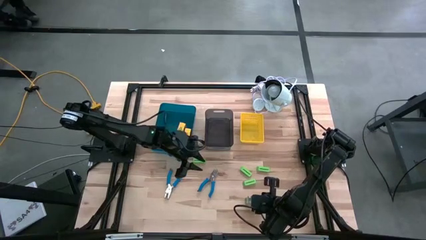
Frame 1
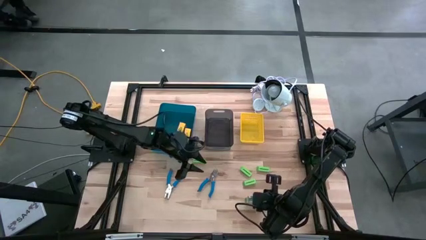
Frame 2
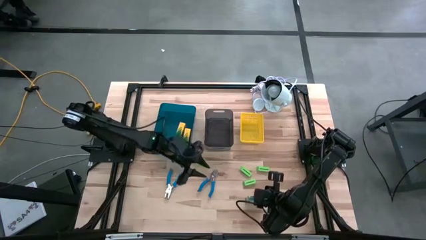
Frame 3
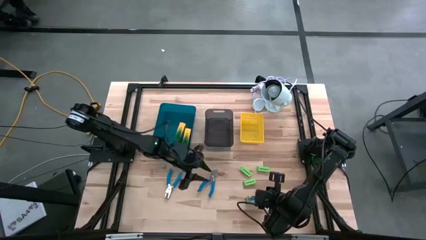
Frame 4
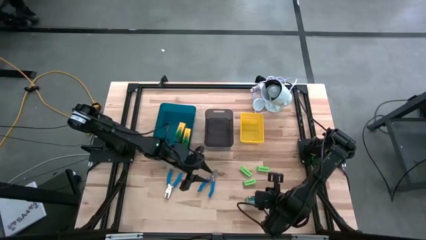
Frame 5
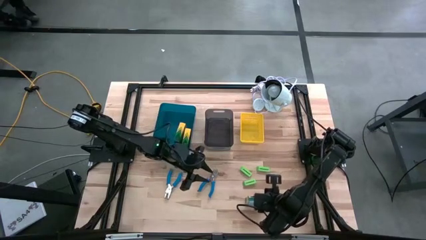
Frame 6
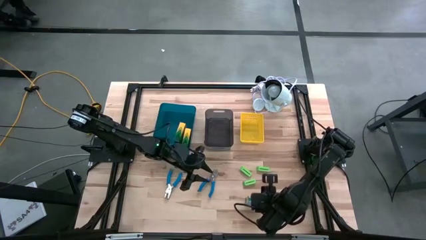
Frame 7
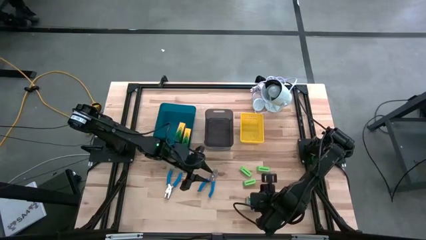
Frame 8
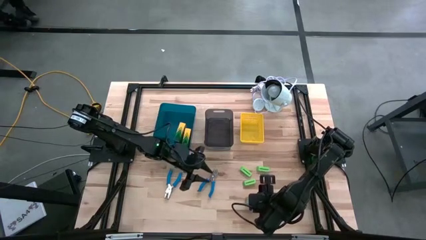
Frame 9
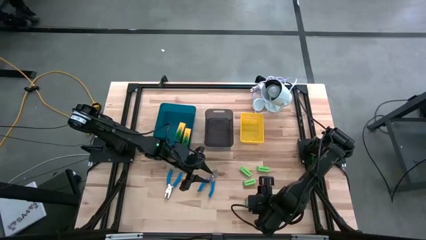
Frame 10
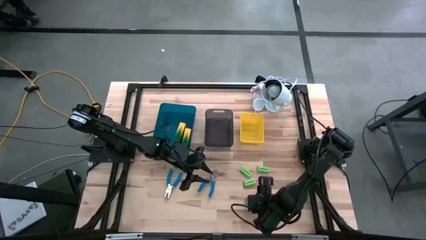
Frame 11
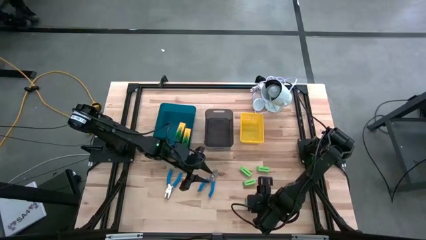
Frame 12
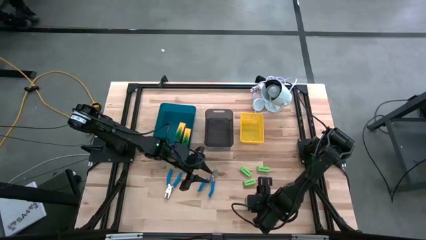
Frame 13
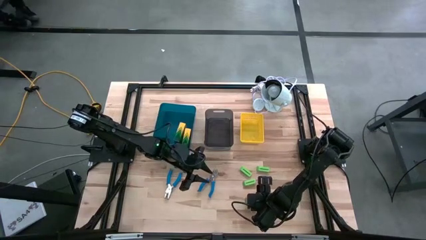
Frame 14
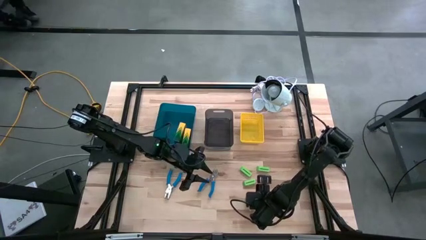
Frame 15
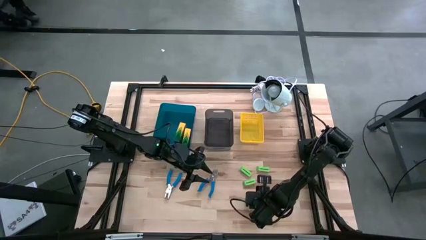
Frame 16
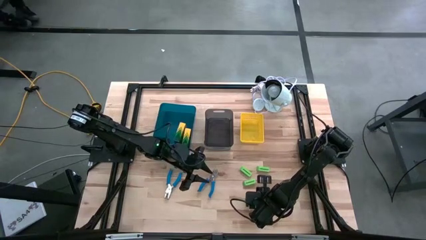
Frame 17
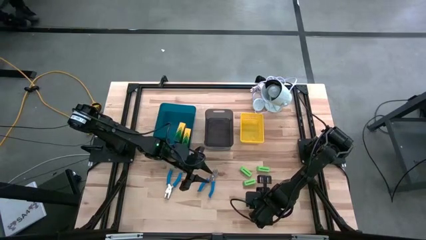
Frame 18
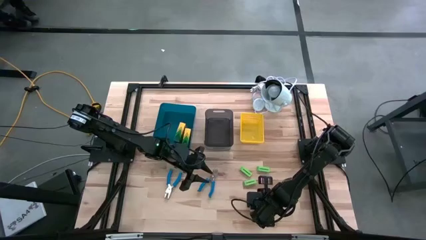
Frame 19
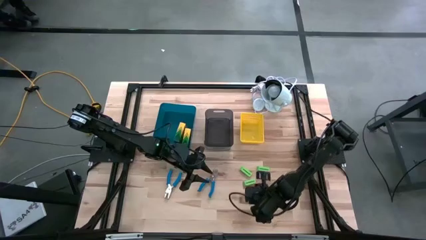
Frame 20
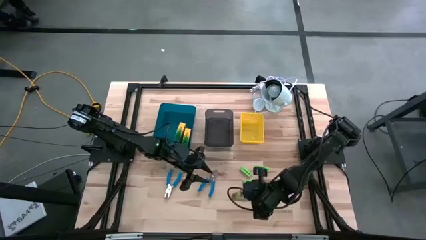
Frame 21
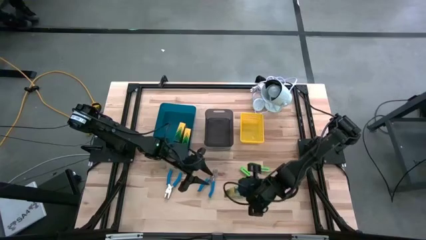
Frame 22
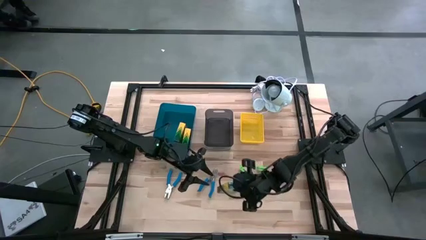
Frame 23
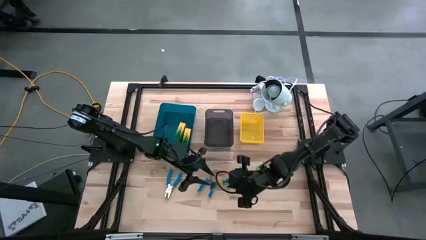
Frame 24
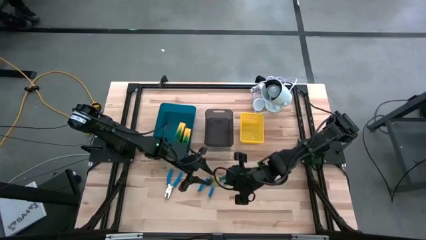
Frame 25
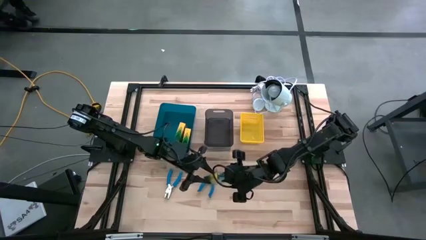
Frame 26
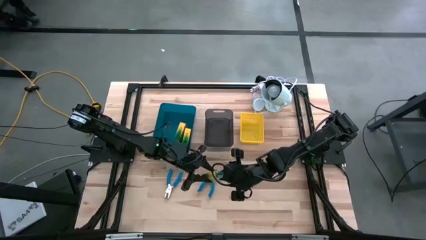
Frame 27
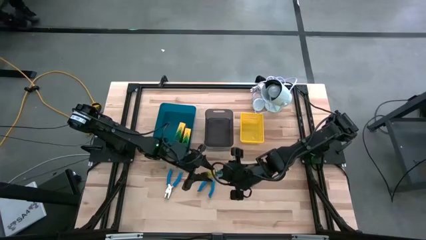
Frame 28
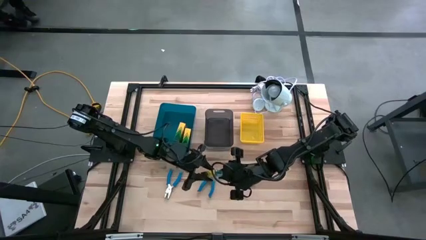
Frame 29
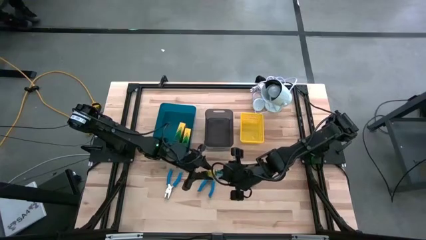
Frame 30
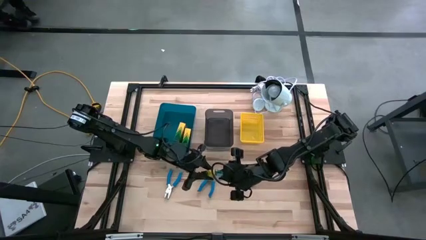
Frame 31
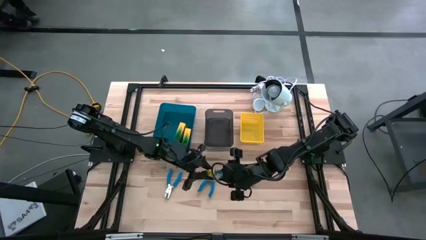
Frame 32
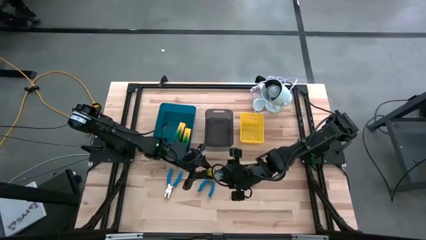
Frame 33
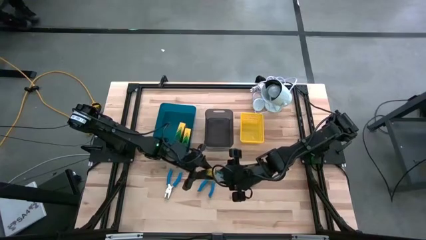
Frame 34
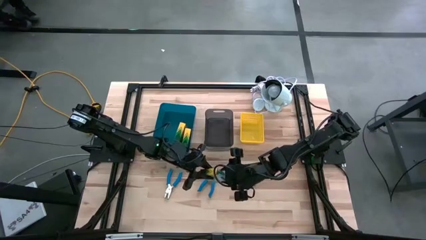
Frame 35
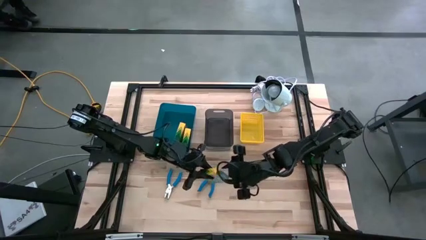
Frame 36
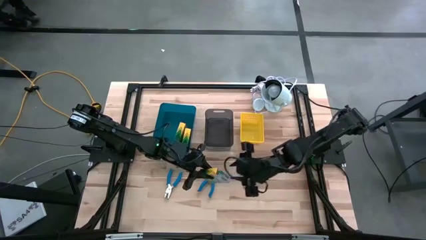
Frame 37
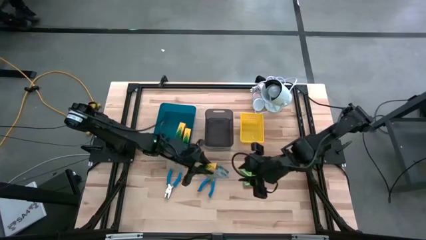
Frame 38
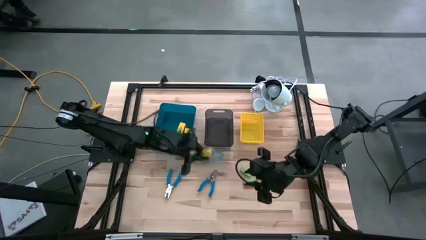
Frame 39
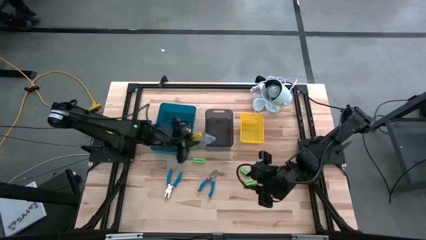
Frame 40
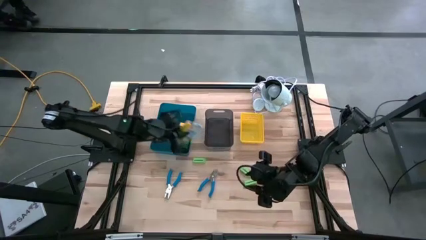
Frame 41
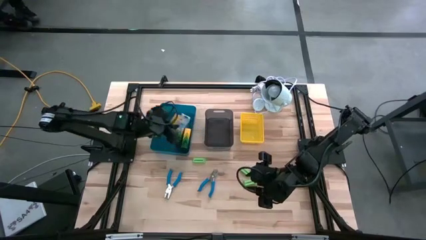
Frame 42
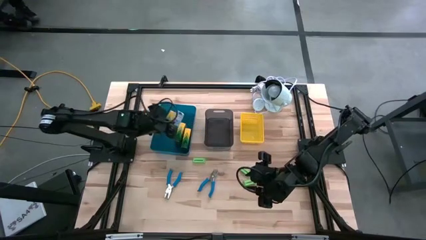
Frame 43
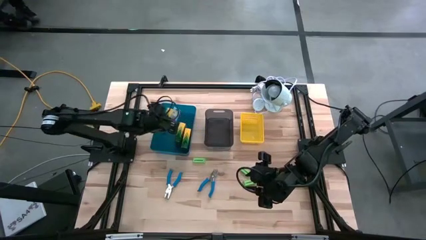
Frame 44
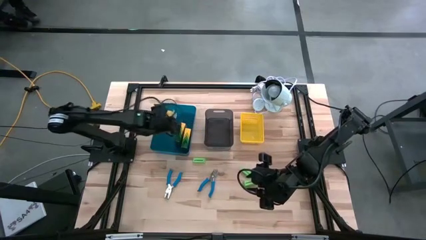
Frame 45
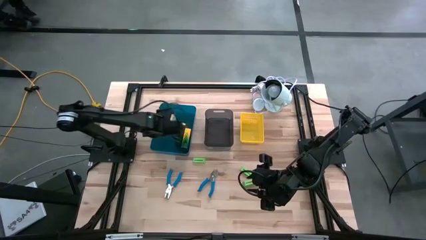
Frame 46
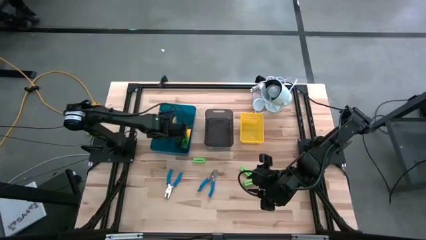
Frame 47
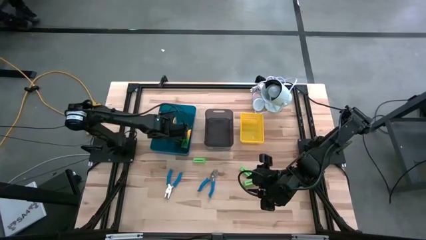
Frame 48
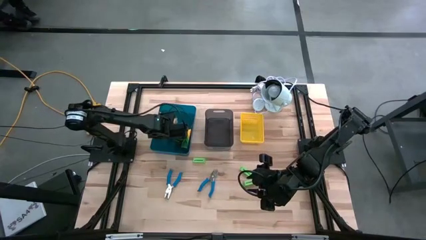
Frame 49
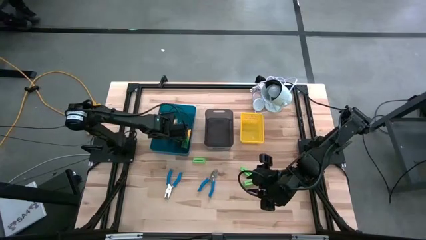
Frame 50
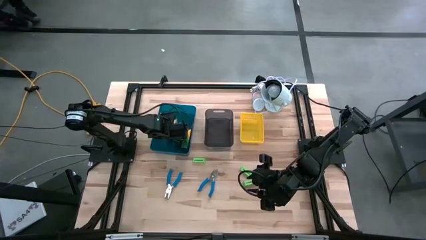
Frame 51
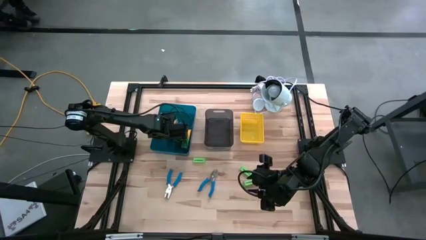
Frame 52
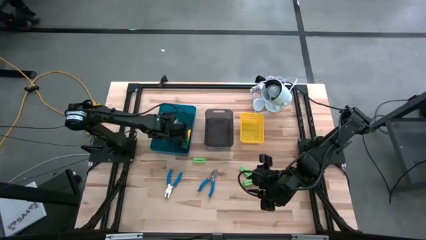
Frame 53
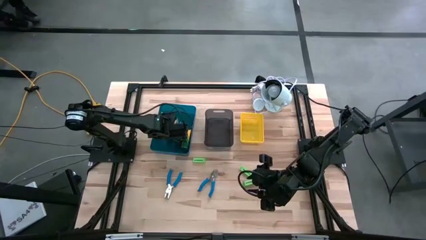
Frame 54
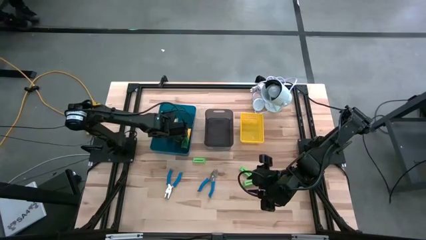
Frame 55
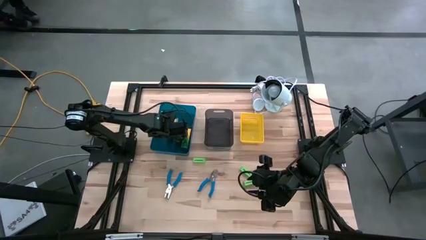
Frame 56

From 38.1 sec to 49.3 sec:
Task: Pick & Place School Supplies
Put the crayon box into the blue bin
